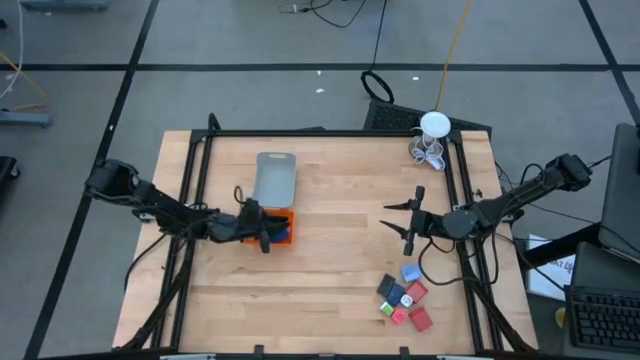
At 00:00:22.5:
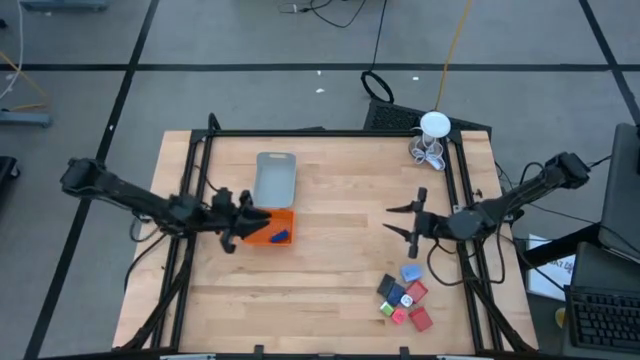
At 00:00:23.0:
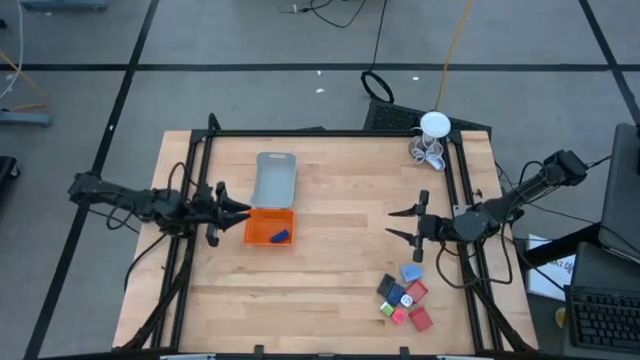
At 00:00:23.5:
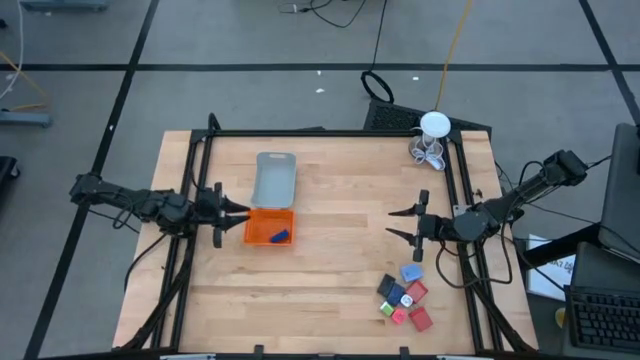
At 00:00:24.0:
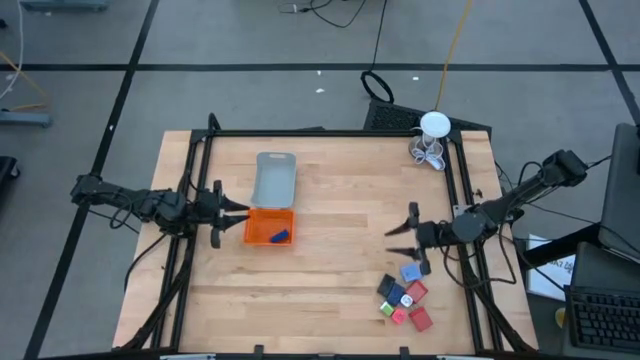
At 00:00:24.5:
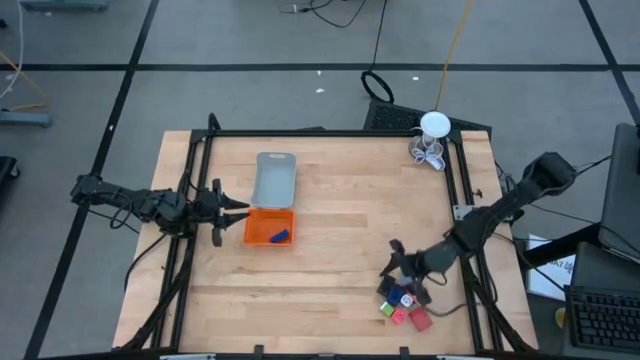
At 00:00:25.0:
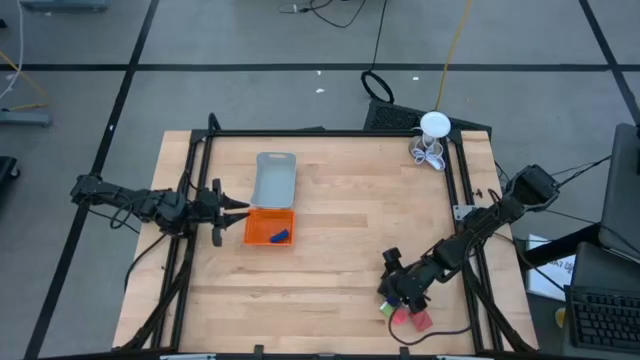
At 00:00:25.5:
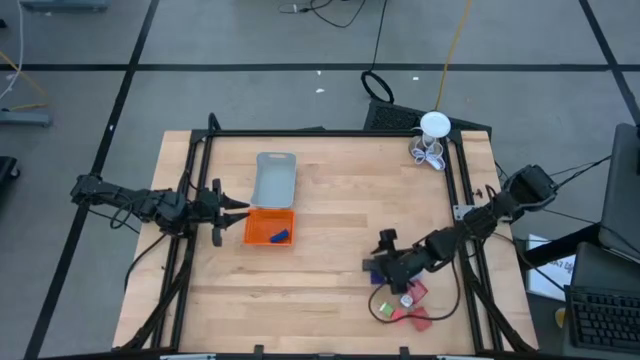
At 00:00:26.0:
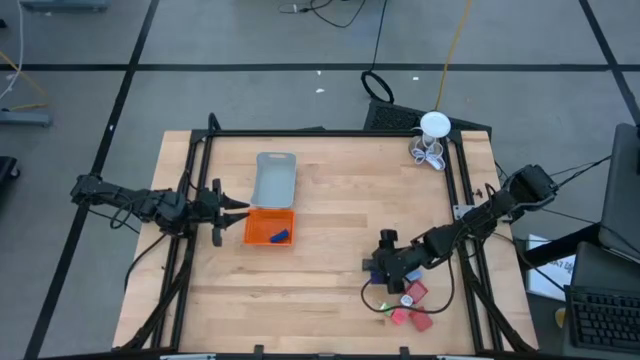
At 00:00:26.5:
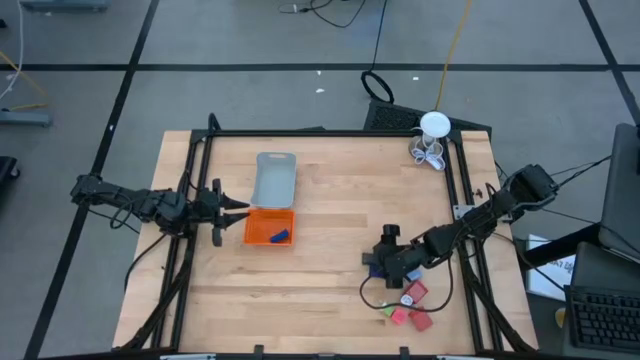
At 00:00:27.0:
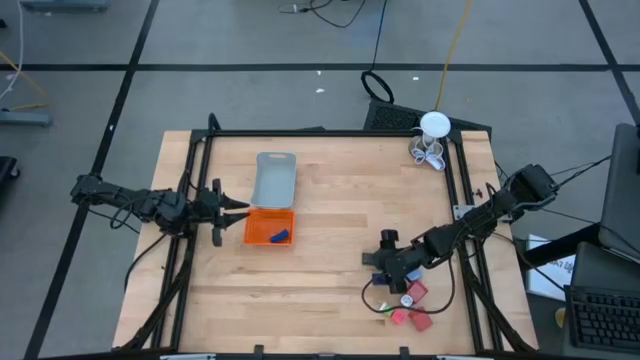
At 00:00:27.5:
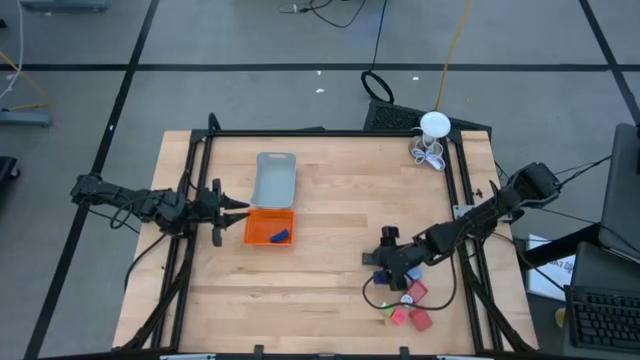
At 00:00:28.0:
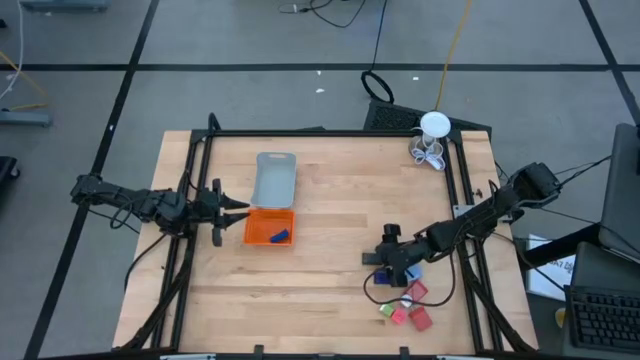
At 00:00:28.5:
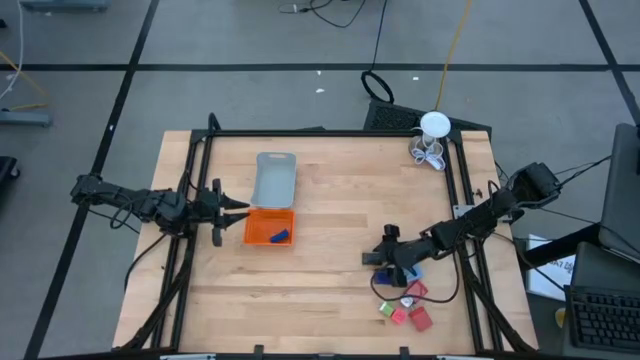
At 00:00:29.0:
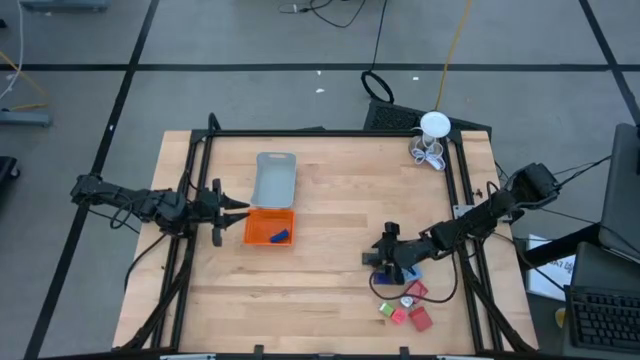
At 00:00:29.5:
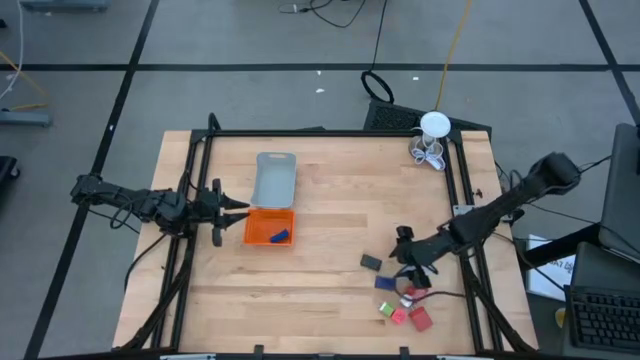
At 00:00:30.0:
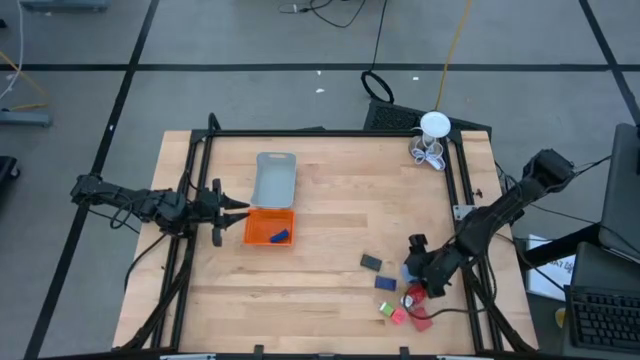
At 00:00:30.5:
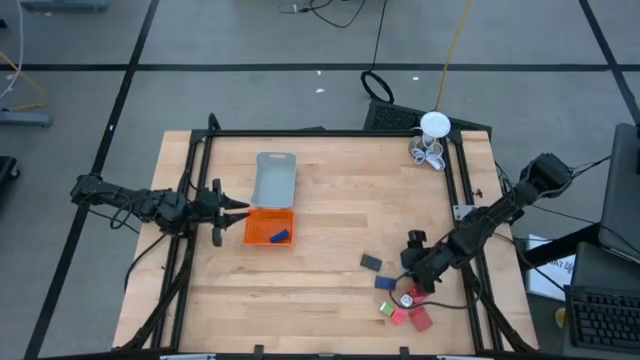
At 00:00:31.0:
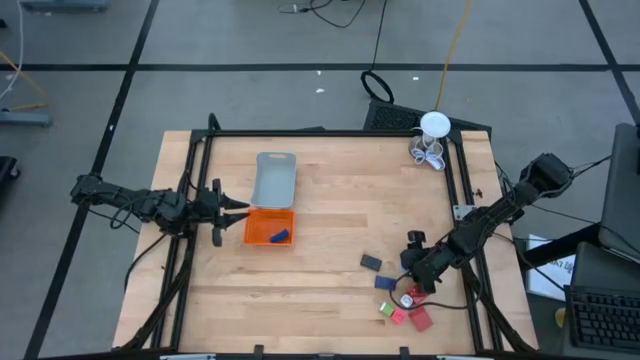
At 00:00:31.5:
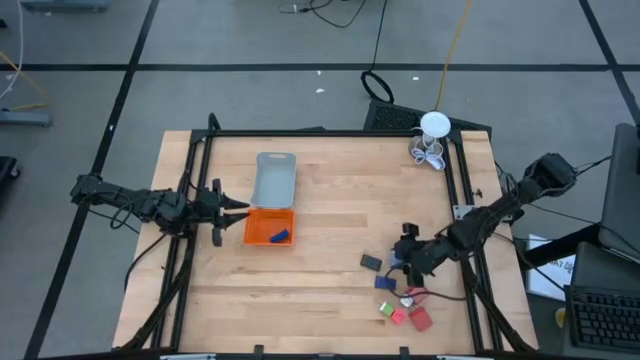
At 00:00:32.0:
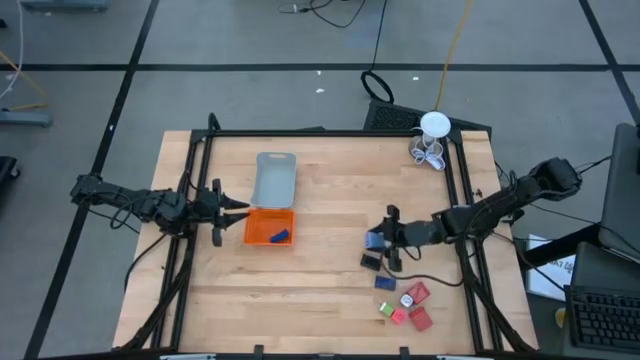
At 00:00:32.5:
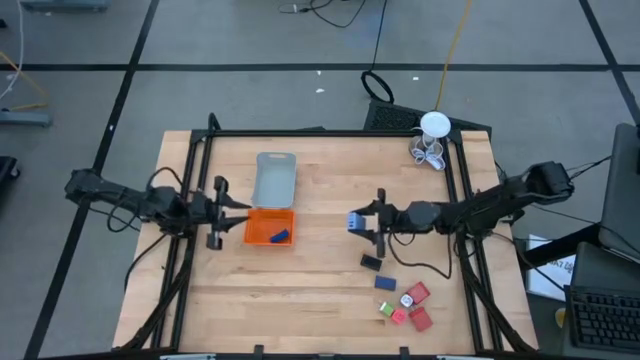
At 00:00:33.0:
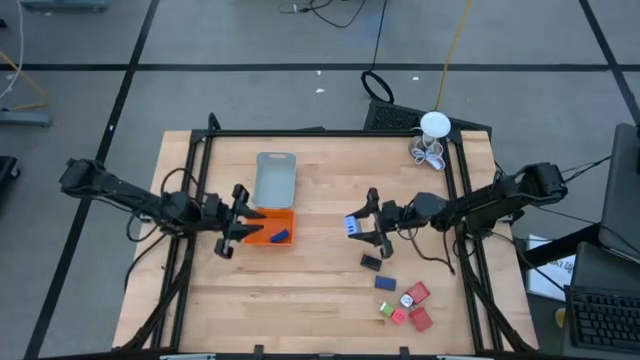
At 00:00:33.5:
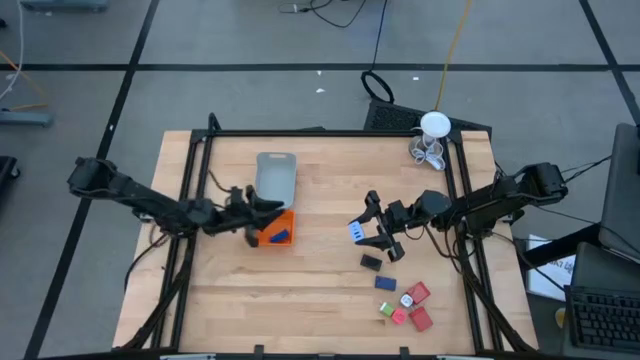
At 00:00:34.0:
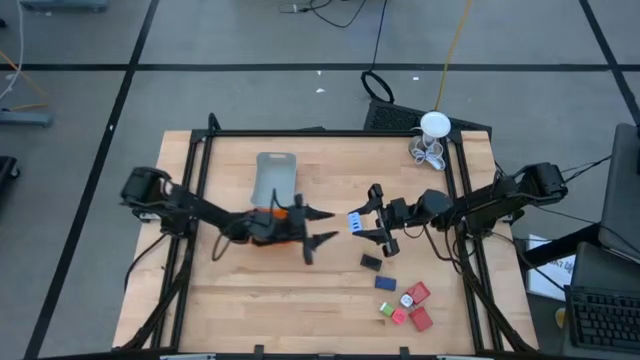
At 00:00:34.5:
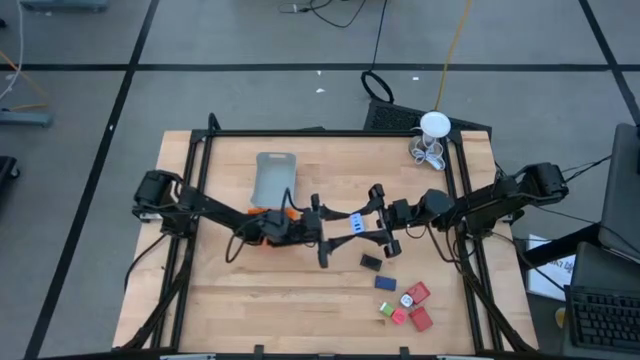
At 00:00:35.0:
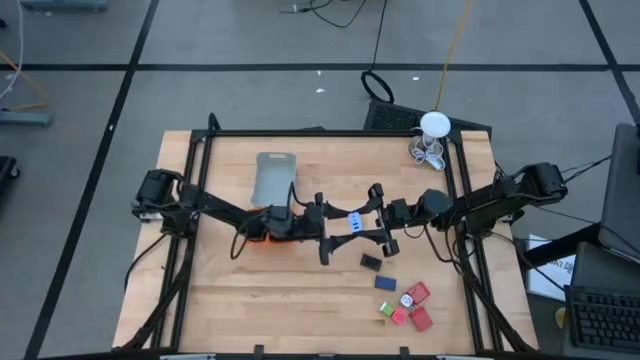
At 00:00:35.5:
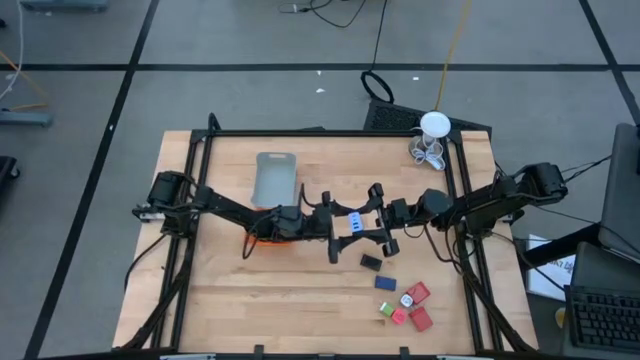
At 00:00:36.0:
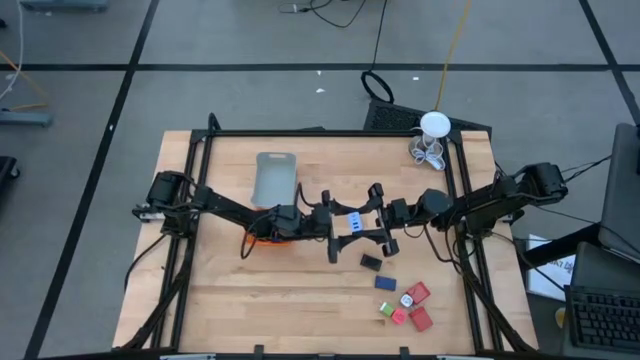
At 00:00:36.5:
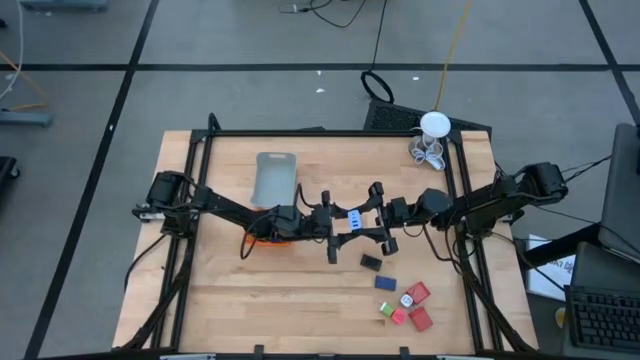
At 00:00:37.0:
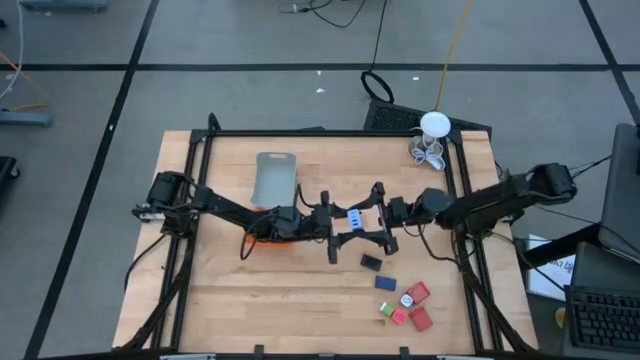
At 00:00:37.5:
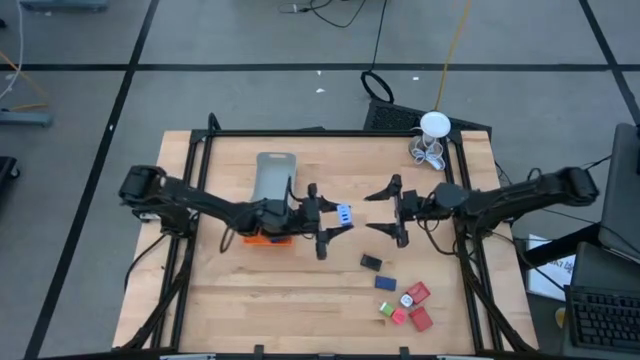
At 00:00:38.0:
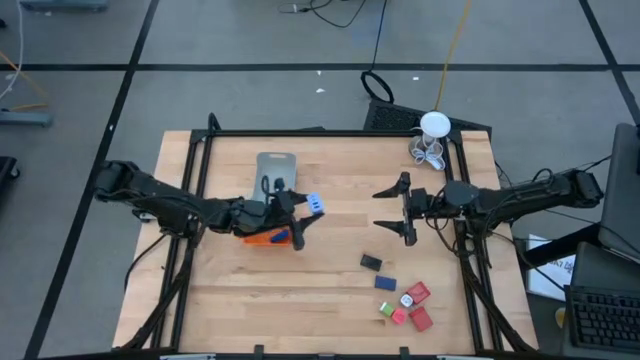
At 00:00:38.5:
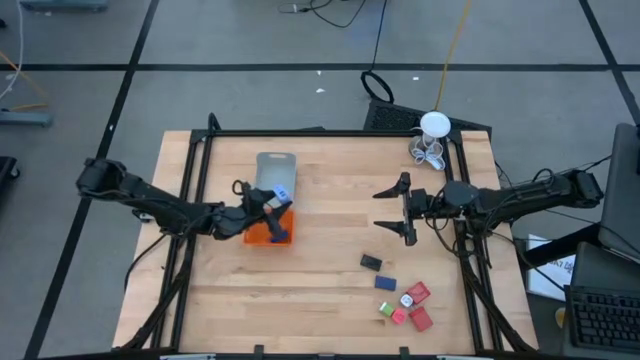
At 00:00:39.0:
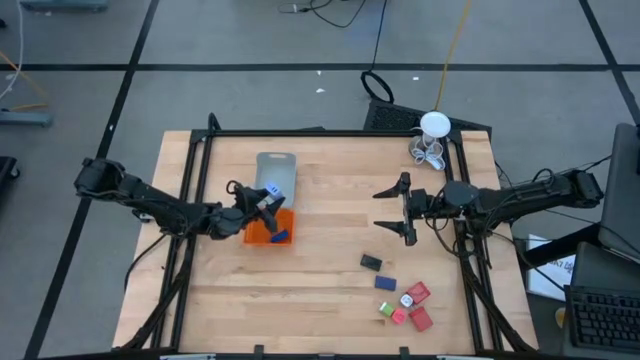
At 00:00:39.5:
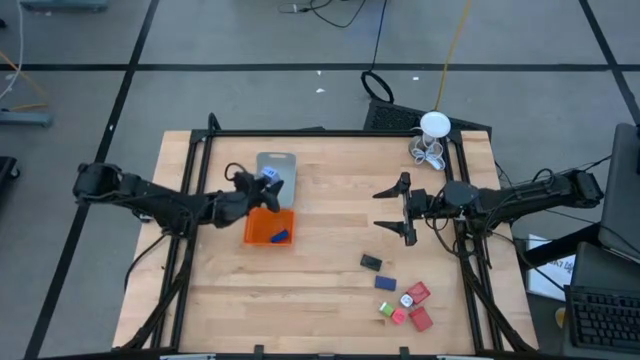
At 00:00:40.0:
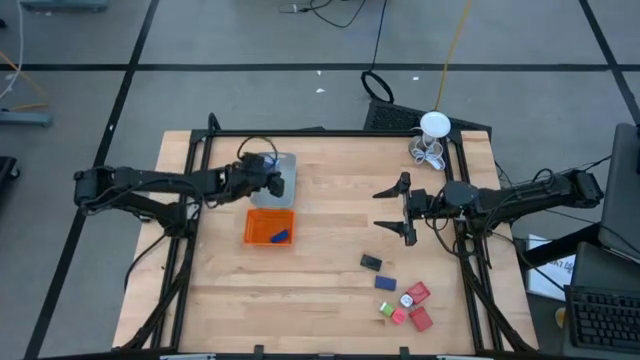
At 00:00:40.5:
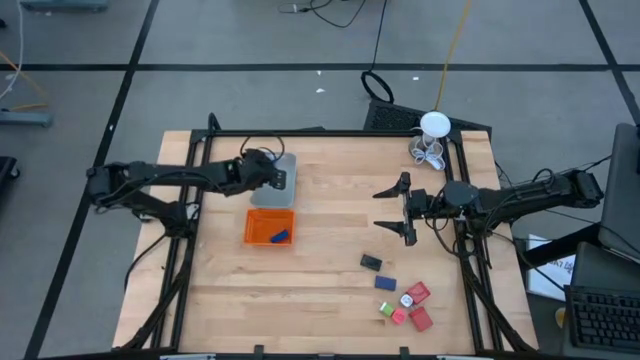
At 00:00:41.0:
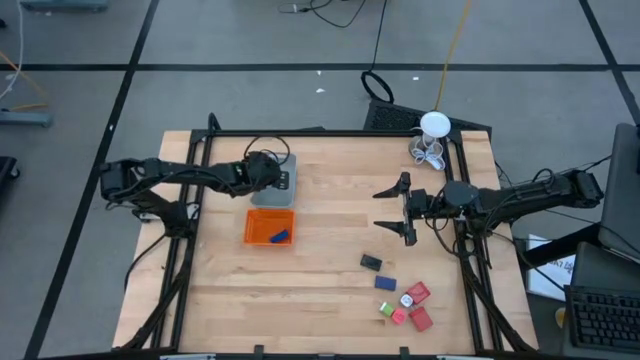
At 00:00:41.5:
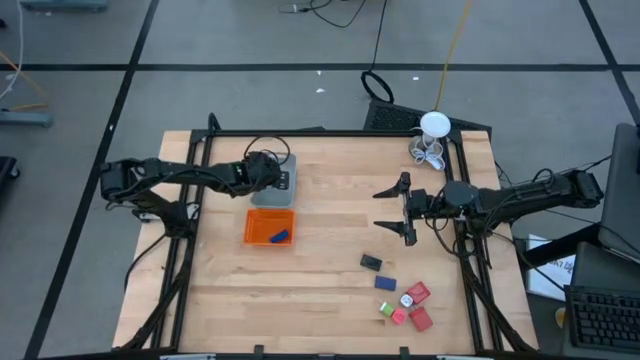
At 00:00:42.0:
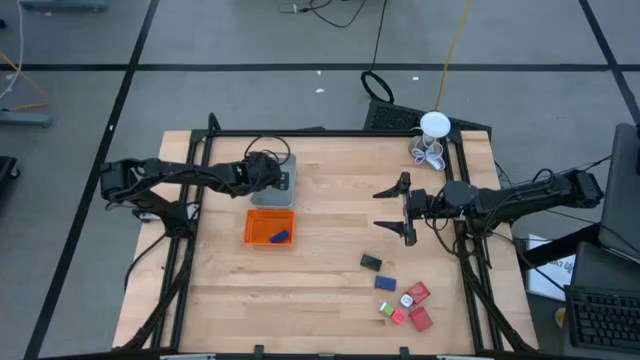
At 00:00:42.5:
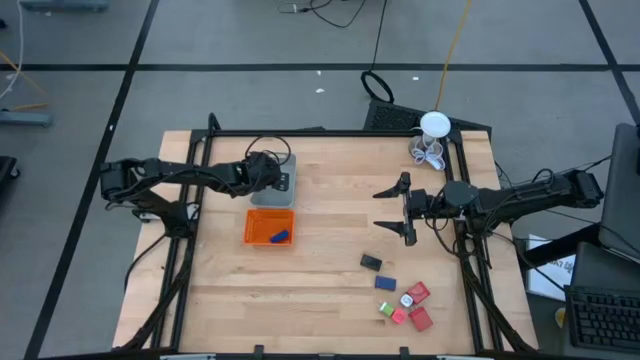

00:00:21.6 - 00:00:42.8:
Task: Pick & Place Office items
Put the purple charger adapter into the gray bin
